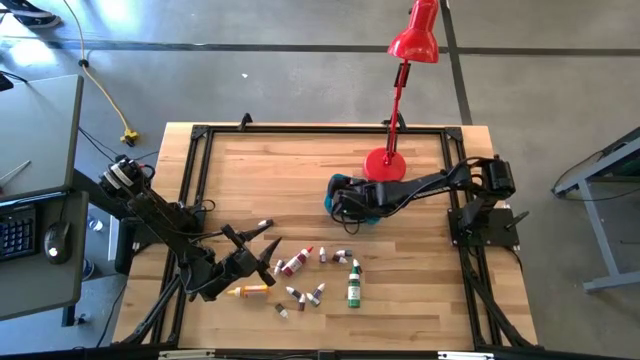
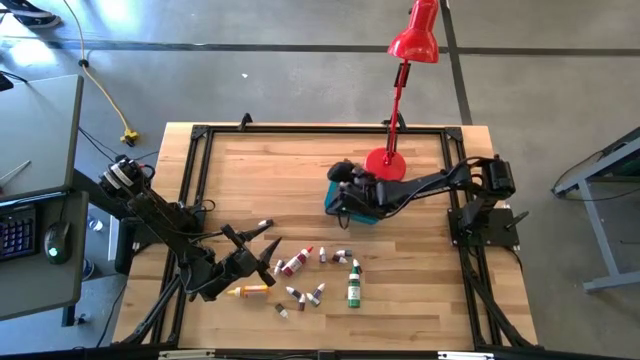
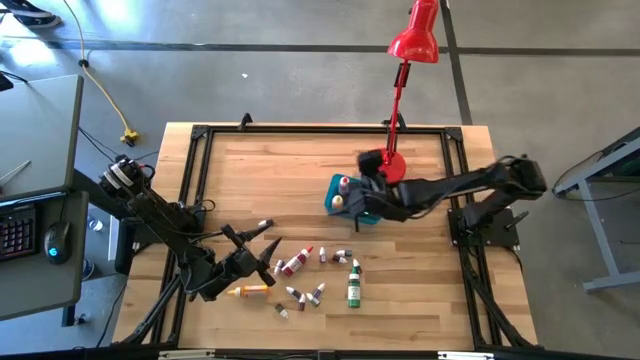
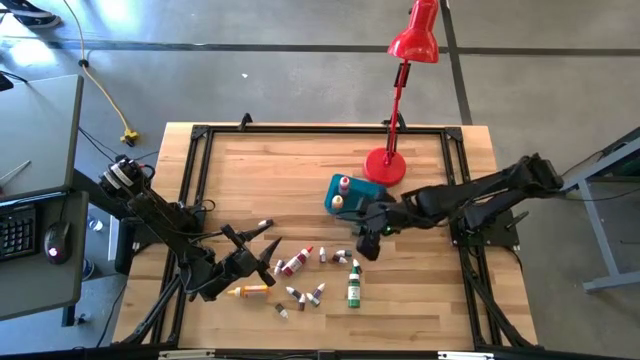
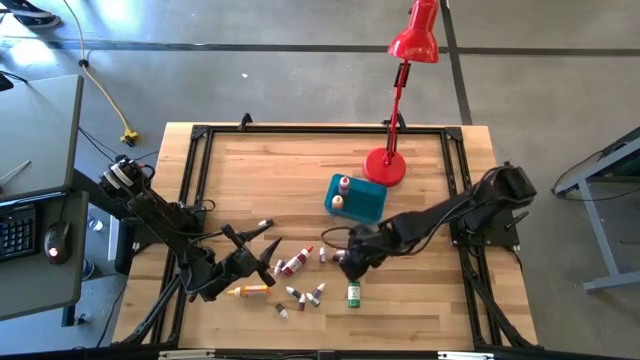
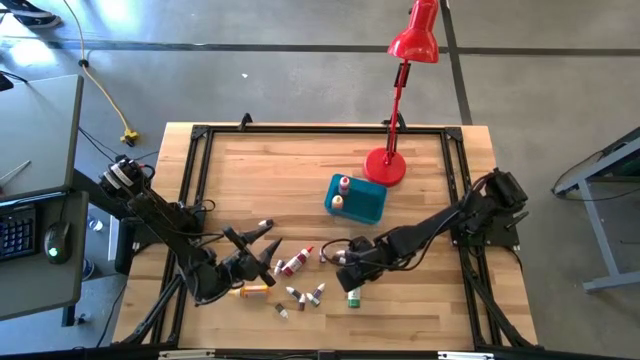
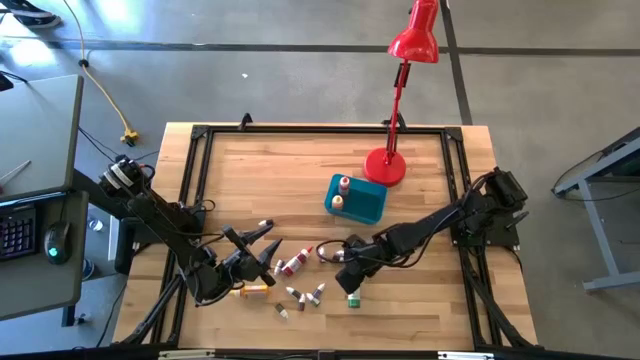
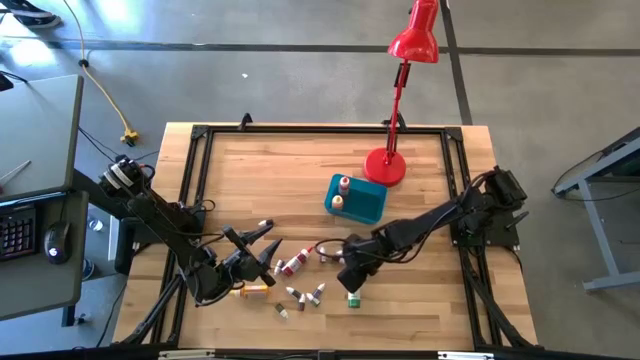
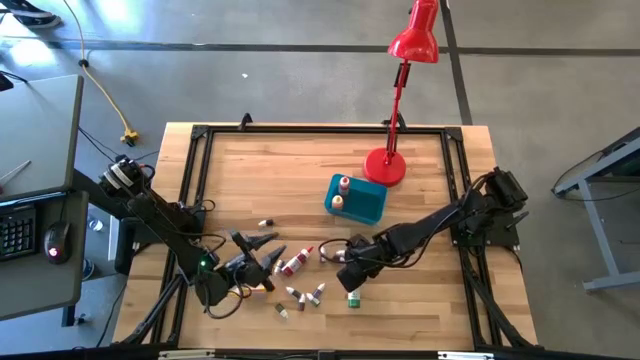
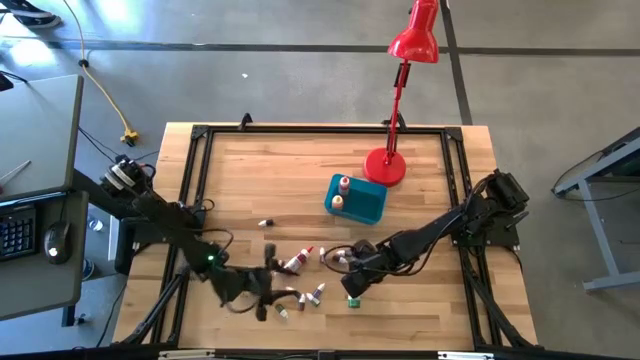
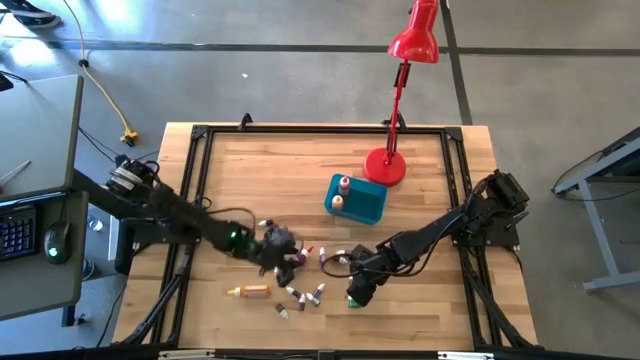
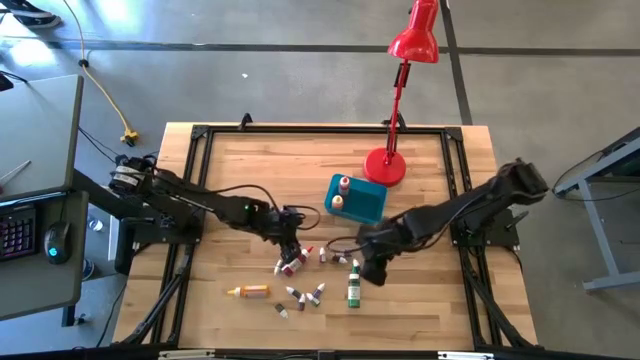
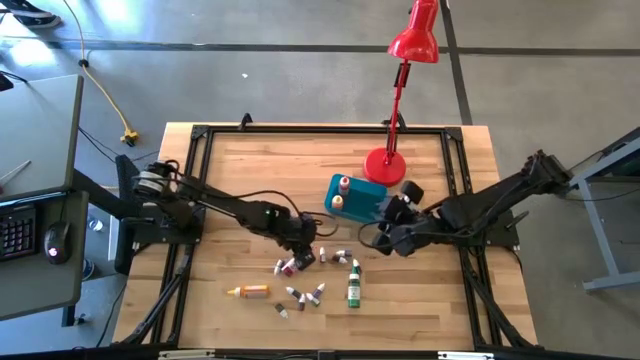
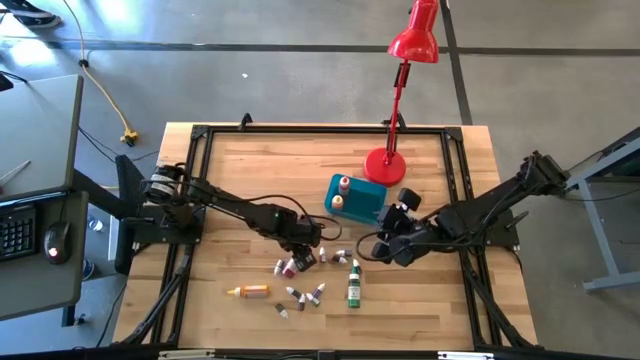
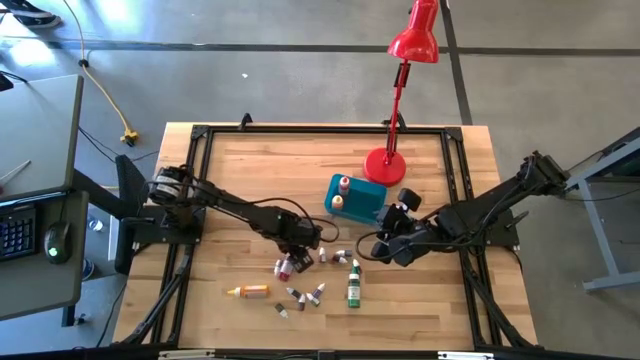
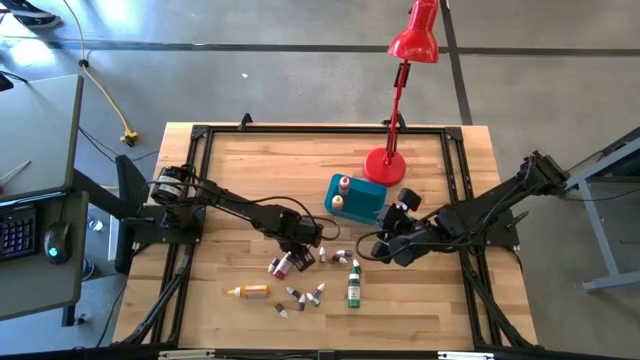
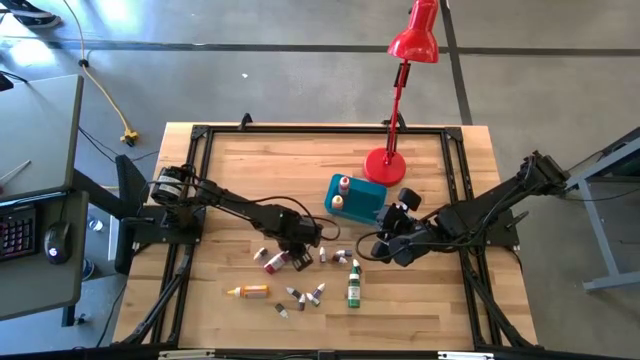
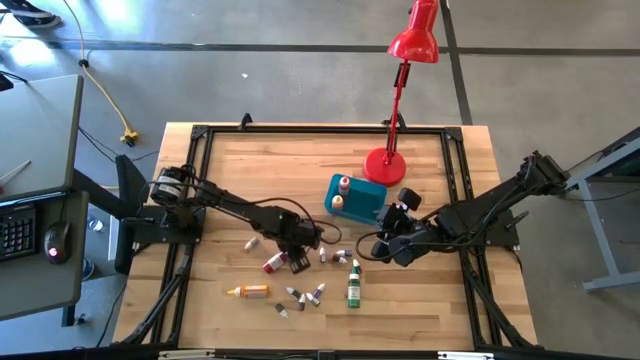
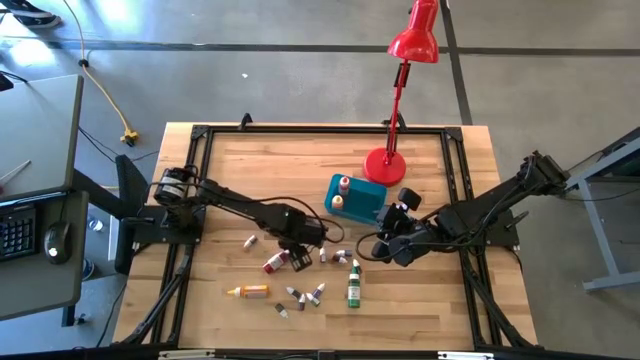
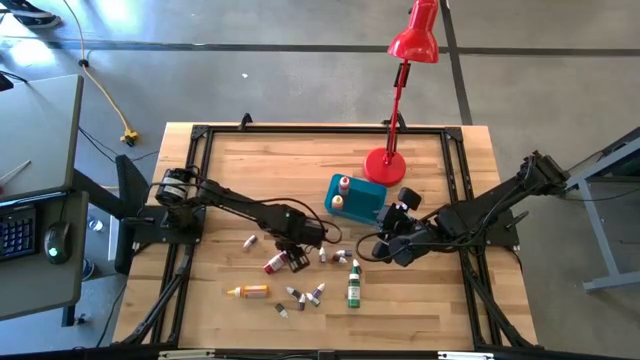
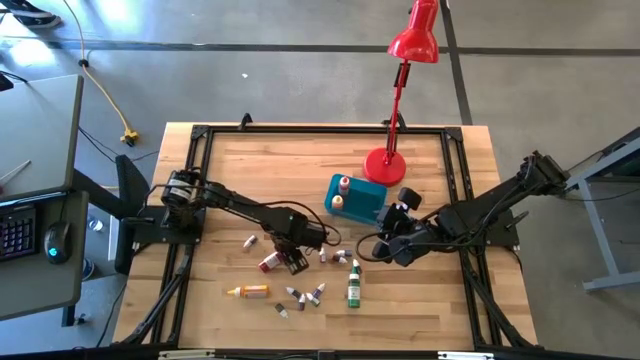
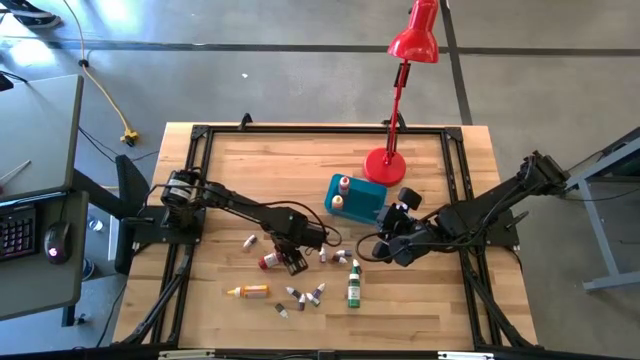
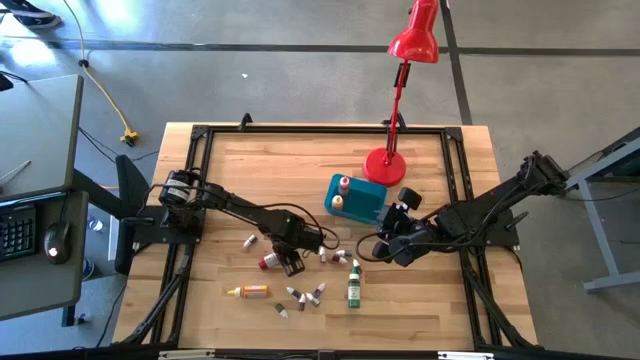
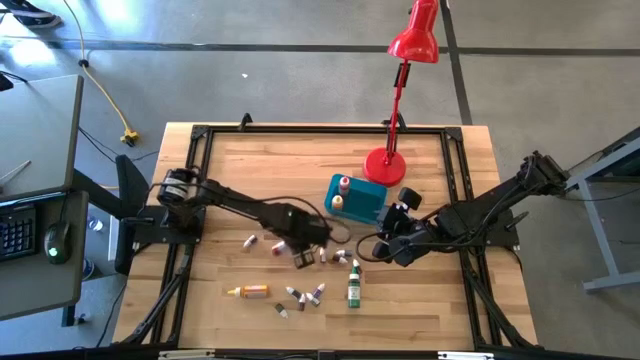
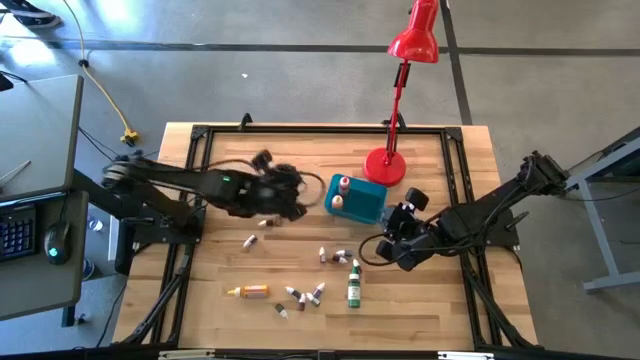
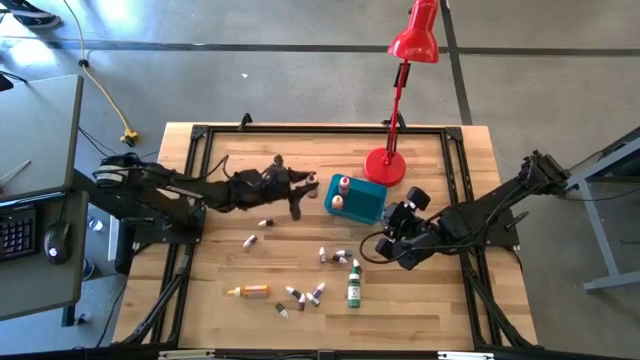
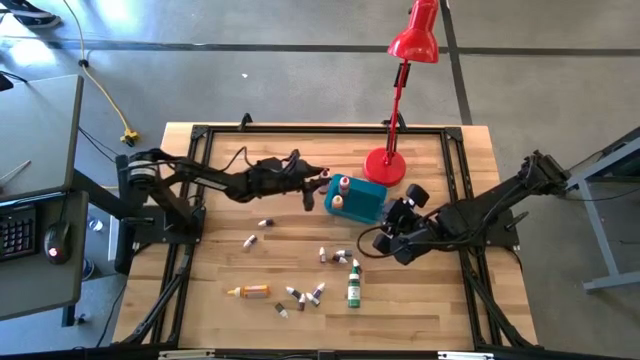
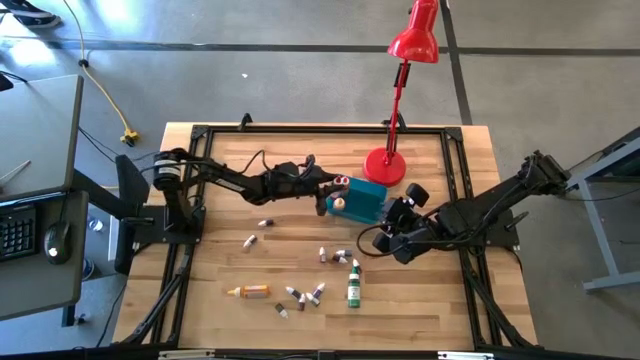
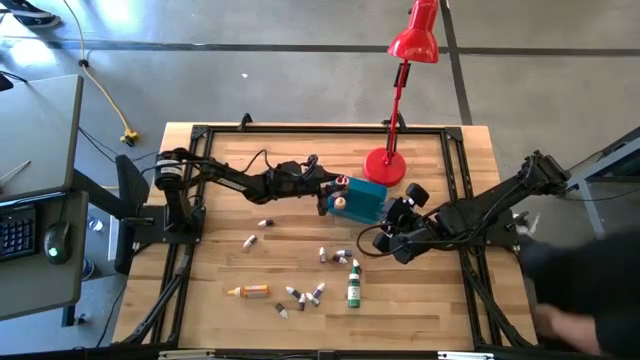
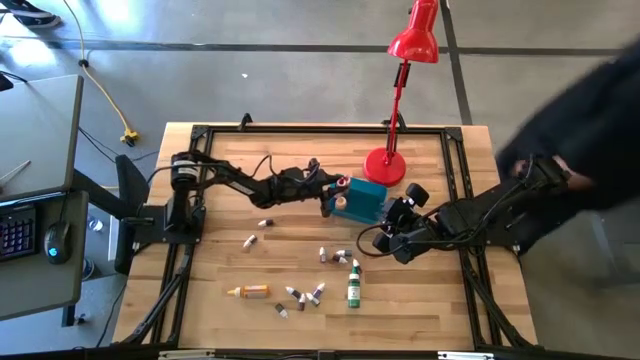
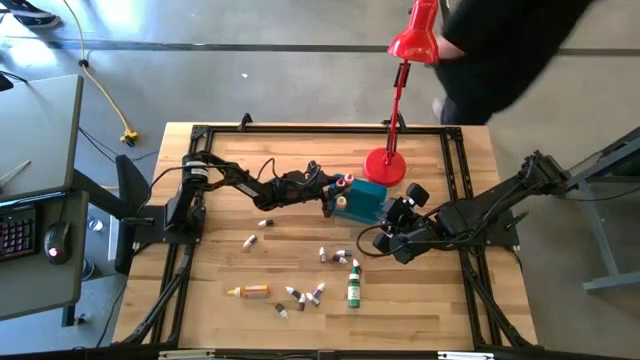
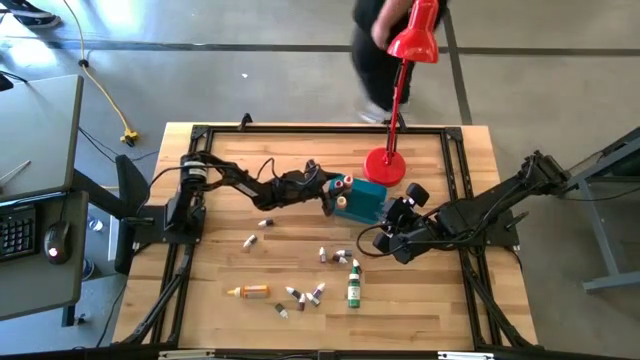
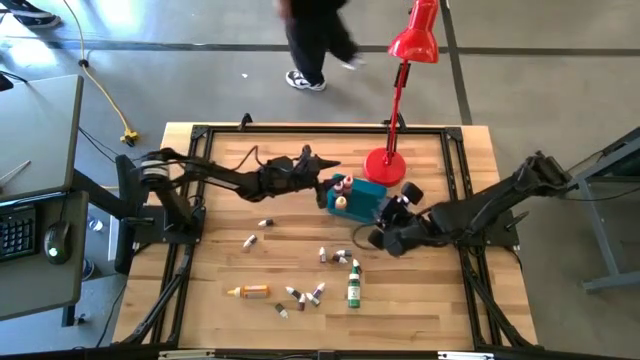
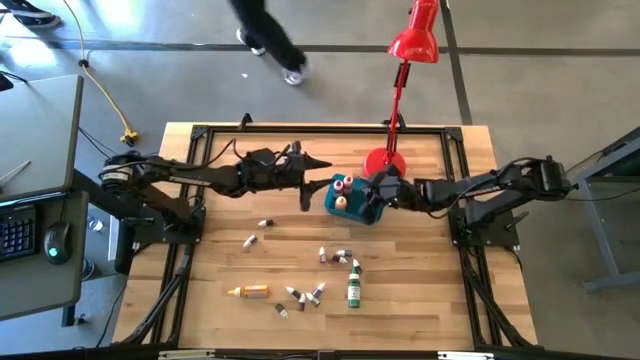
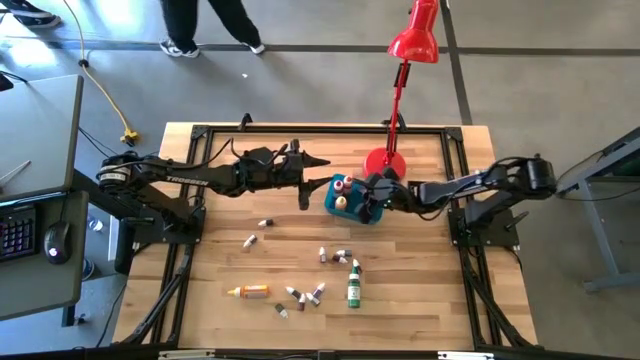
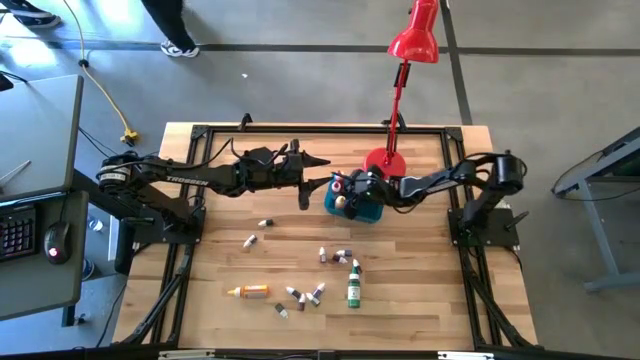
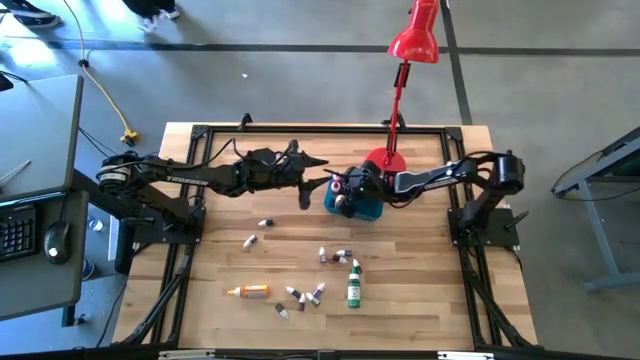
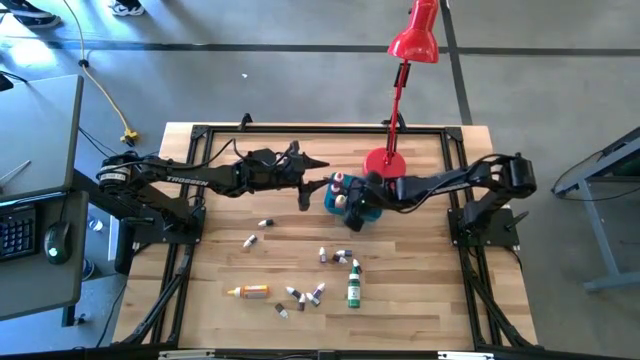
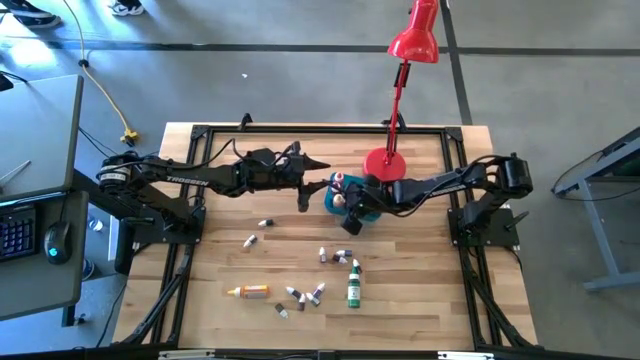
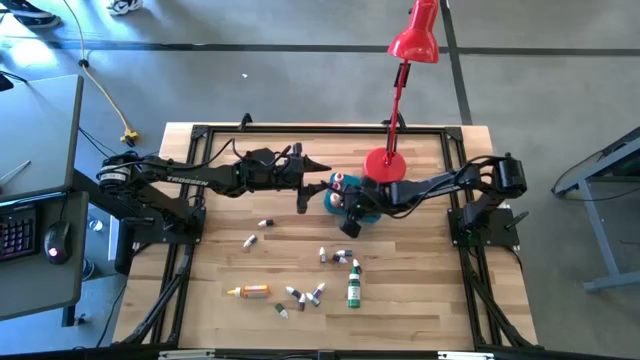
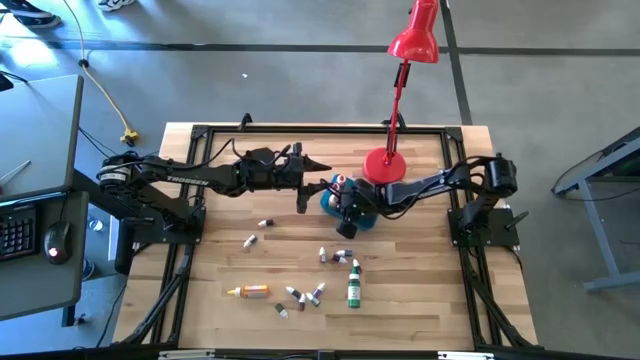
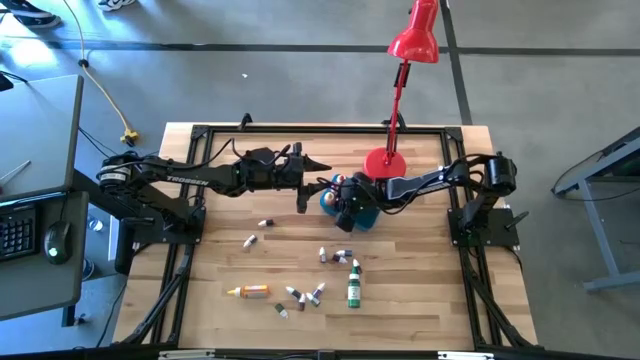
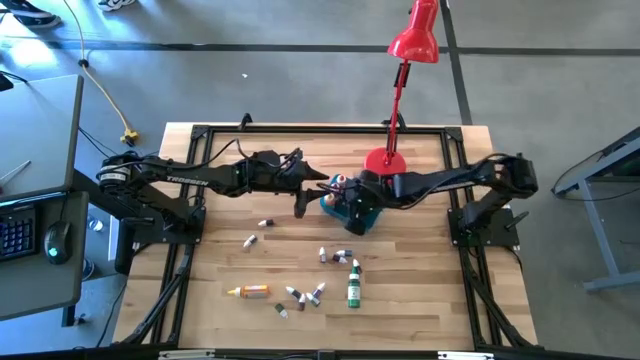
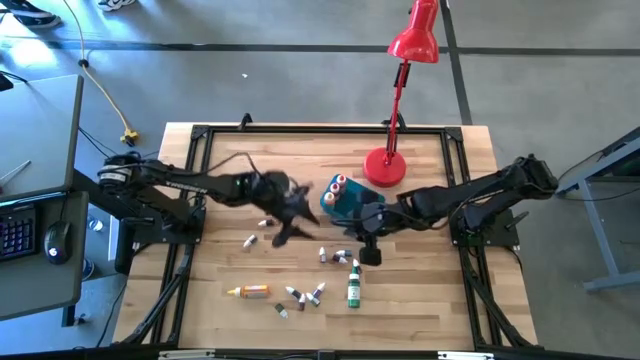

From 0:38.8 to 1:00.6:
Task: Pick & Place food coloring
Put the big red food coloring bottle into the blue container
